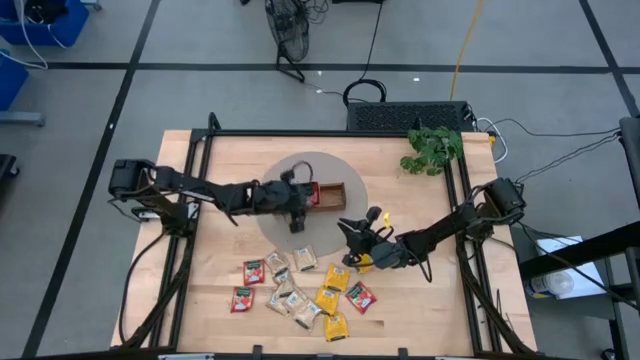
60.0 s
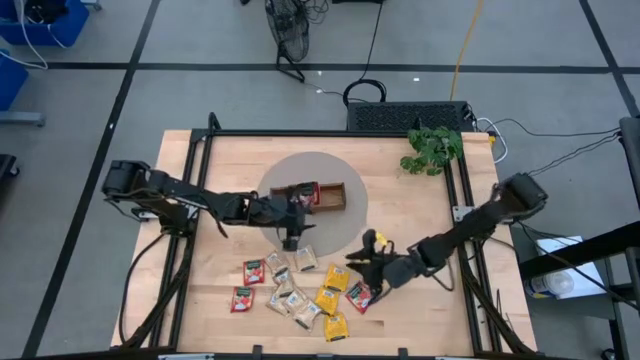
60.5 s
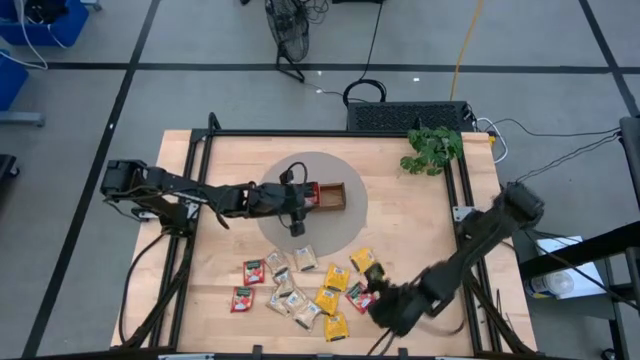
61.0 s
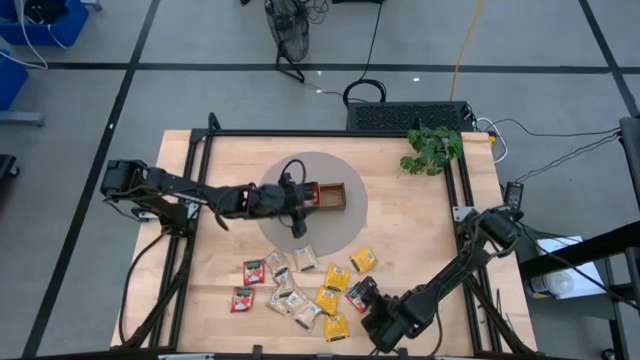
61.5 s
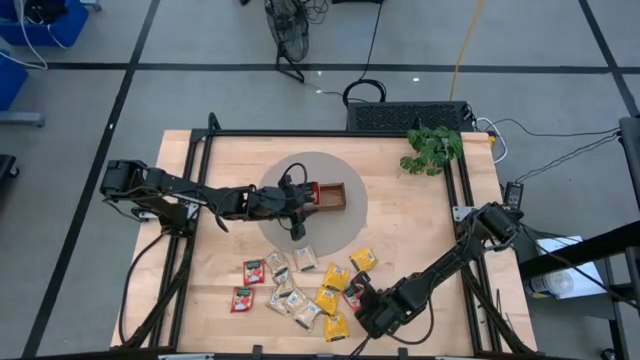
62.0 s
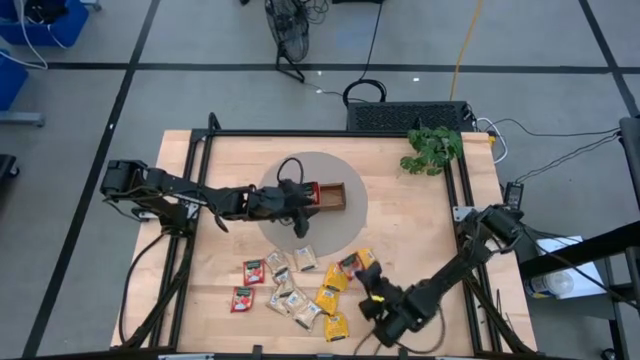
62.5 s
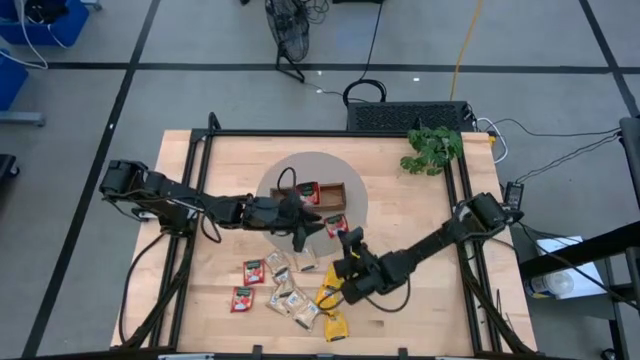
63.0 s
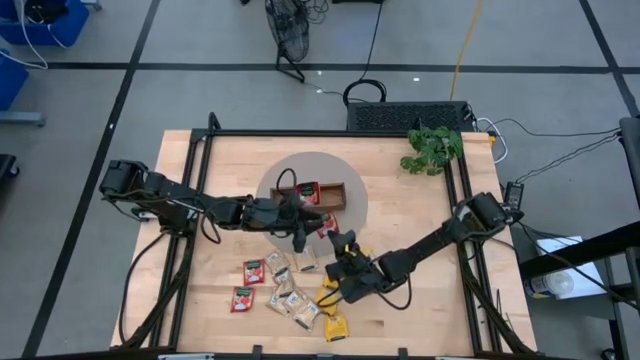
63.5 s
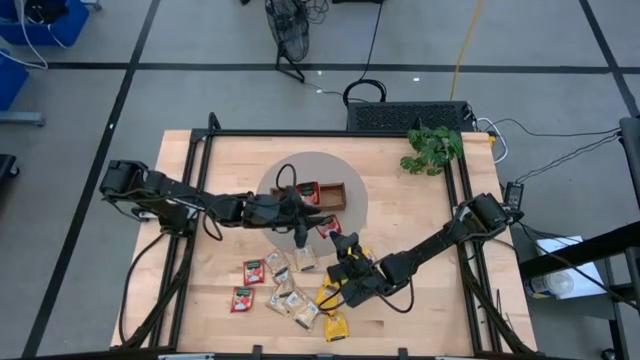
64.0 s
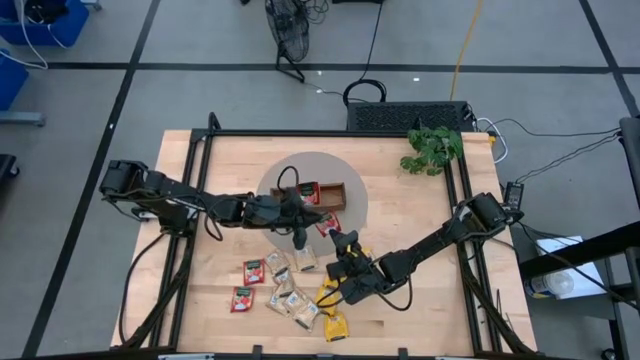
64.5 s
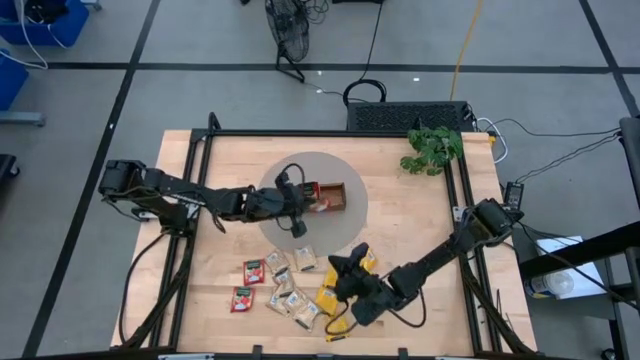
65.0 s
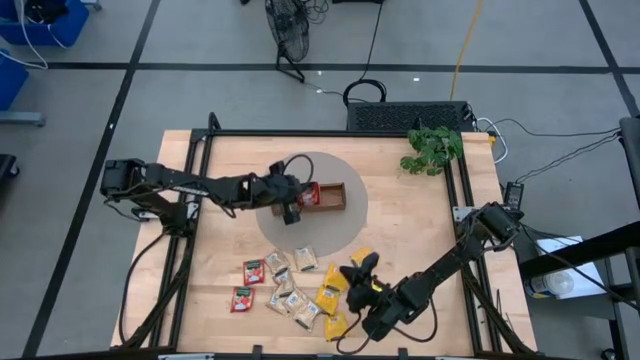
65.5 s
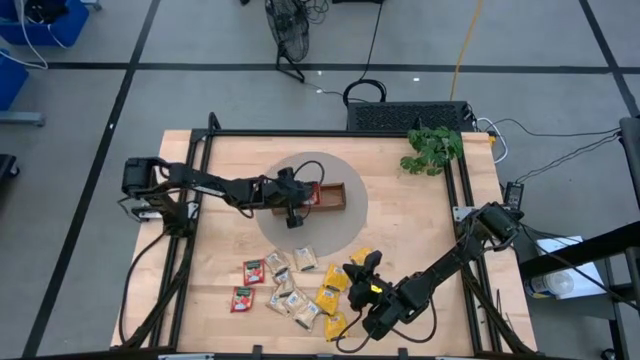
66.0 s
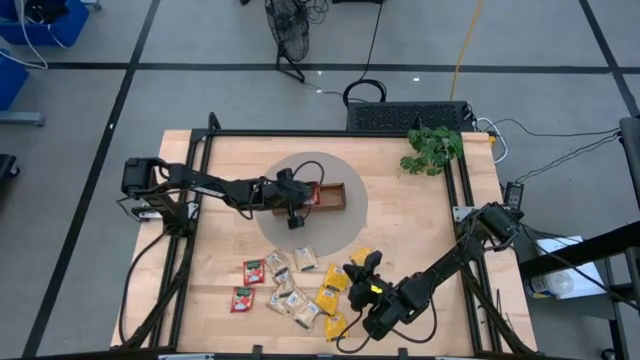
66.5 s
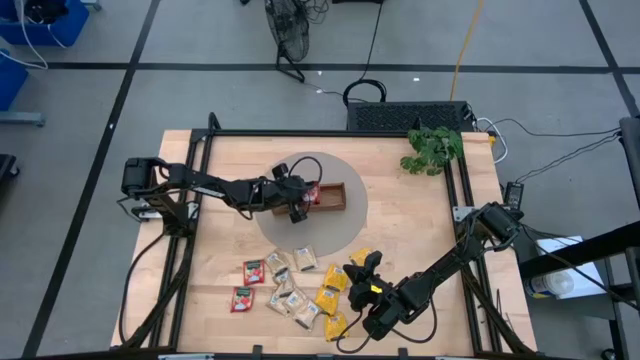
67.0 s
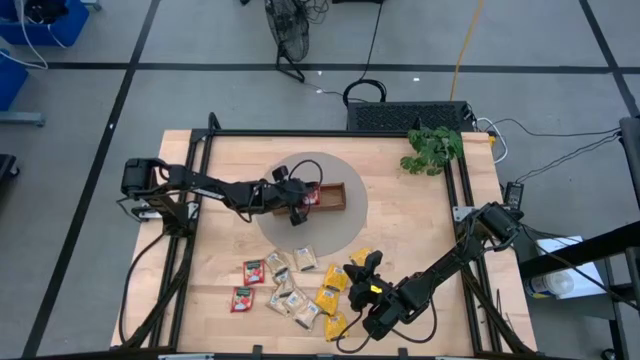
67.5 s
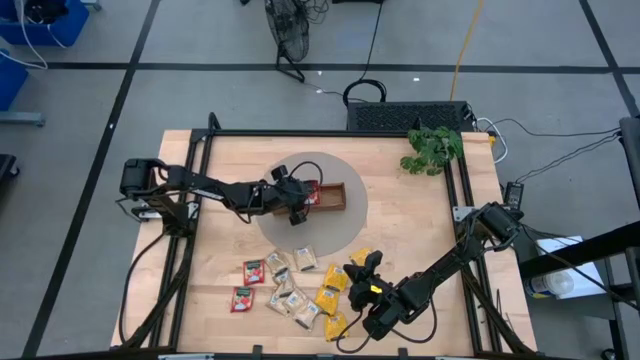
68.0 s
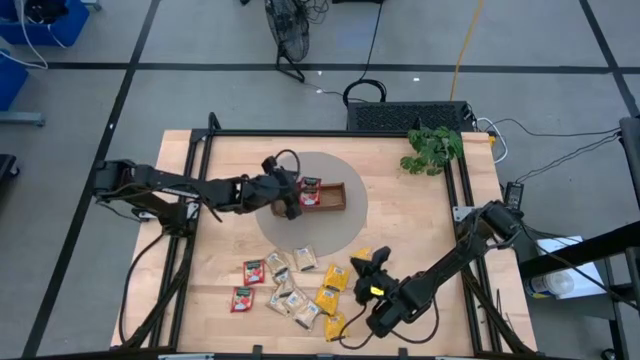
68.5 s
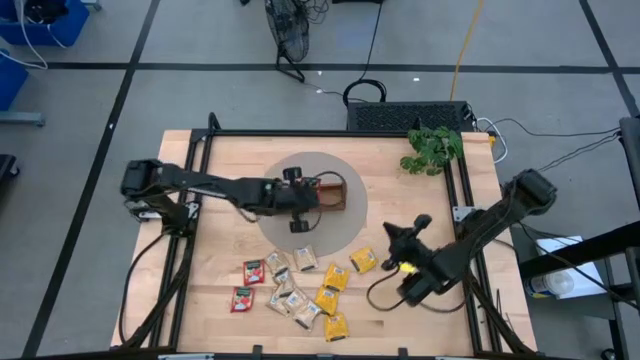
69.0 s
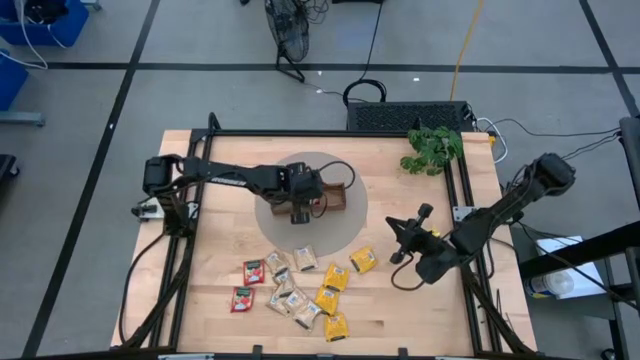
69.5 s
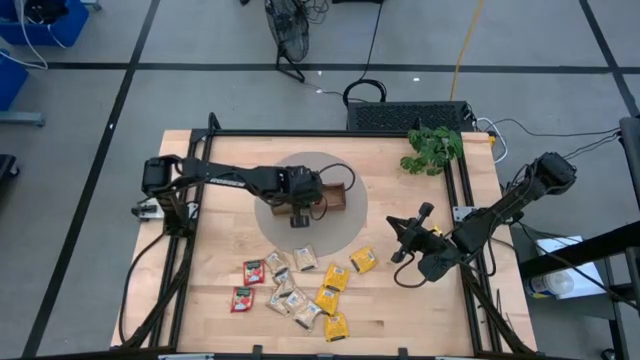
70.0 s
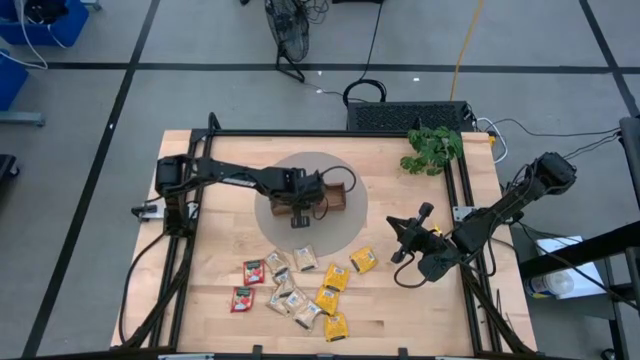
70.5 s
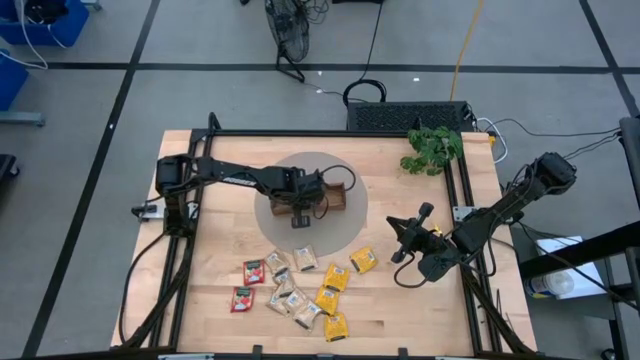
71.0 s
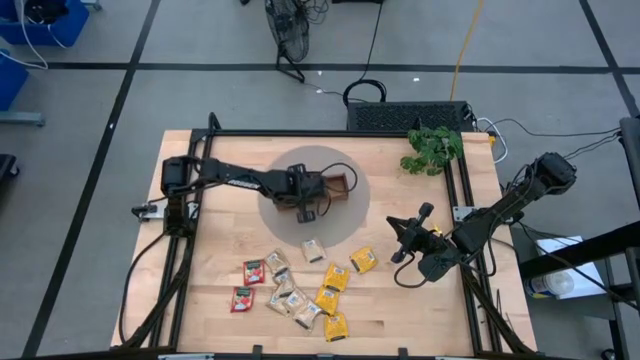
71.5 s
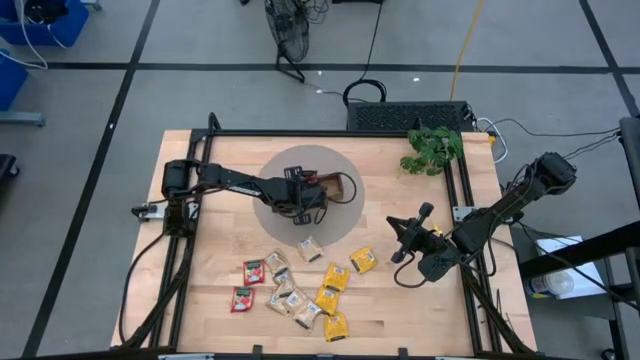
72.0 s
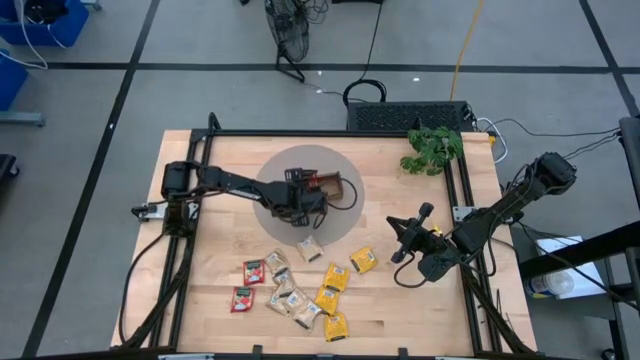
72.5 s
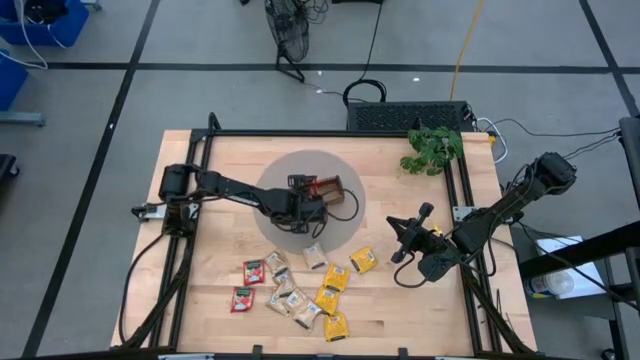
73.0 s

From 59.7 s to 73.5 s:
Task: Pick & Place Tea
Put the red tea bag into the wooden organizer

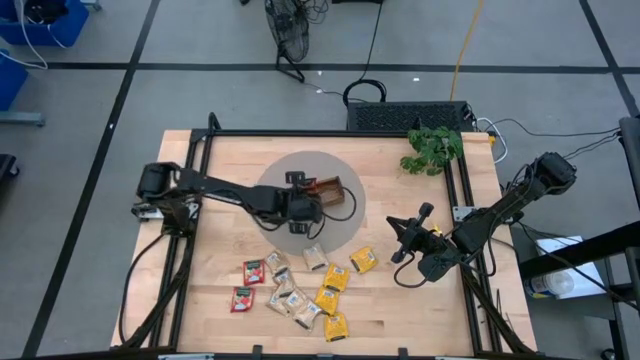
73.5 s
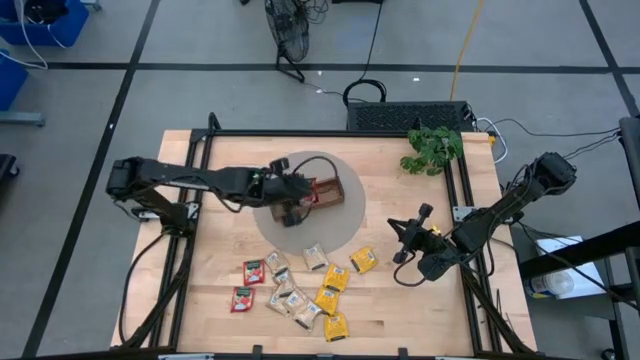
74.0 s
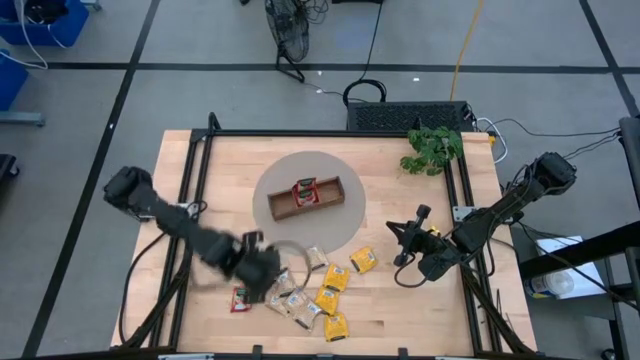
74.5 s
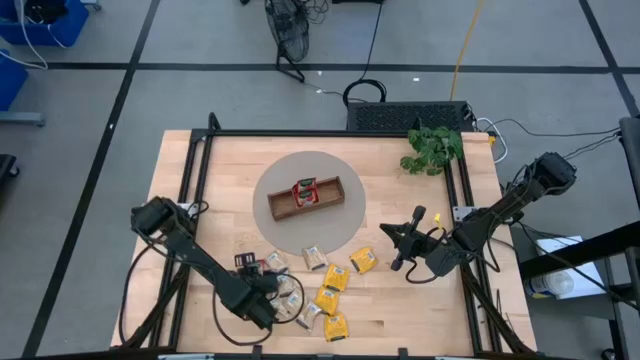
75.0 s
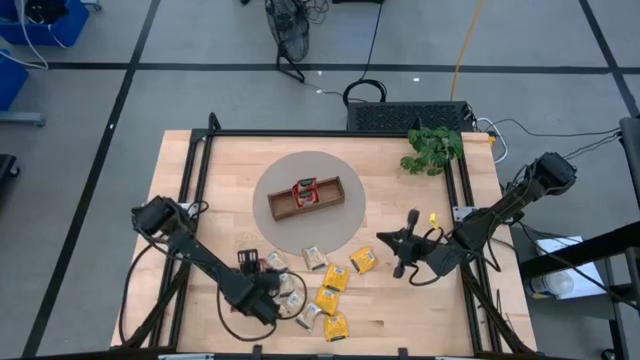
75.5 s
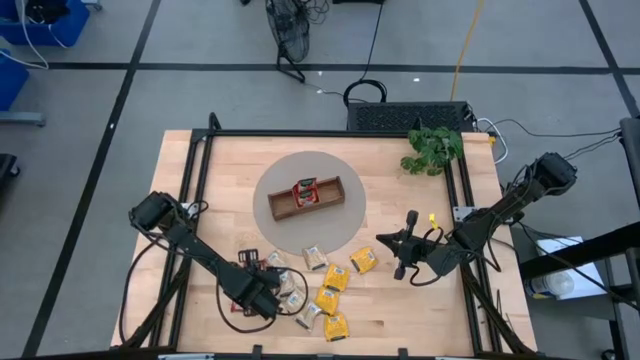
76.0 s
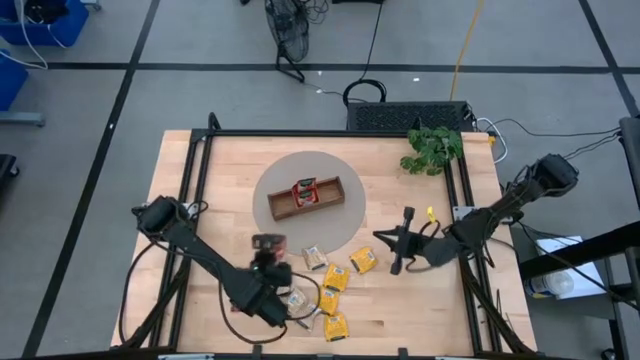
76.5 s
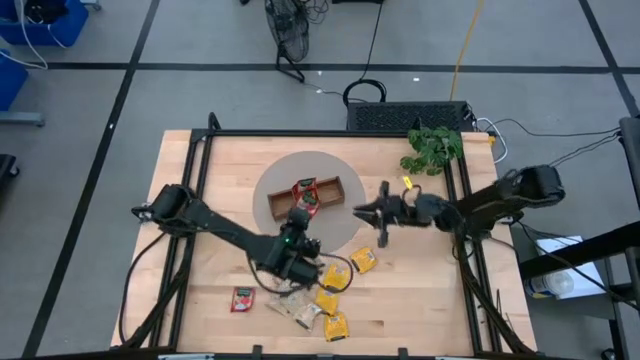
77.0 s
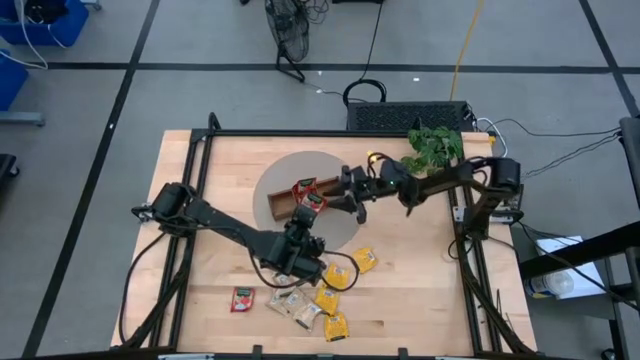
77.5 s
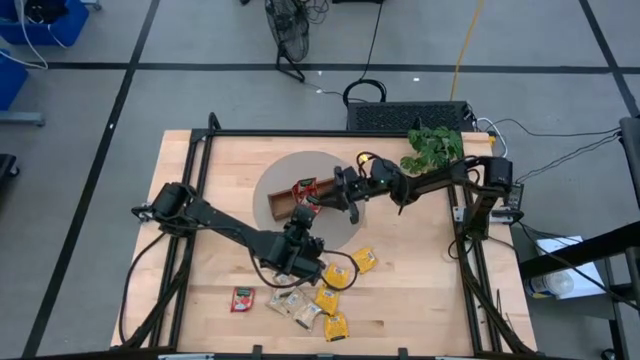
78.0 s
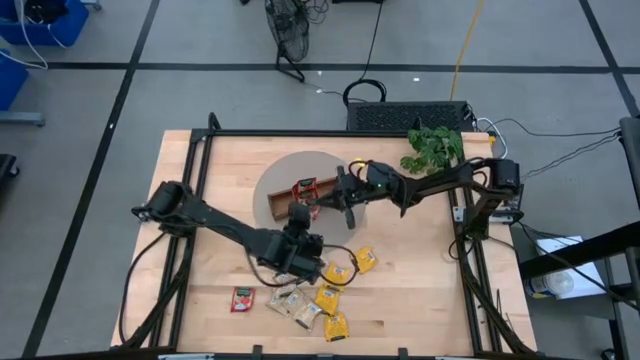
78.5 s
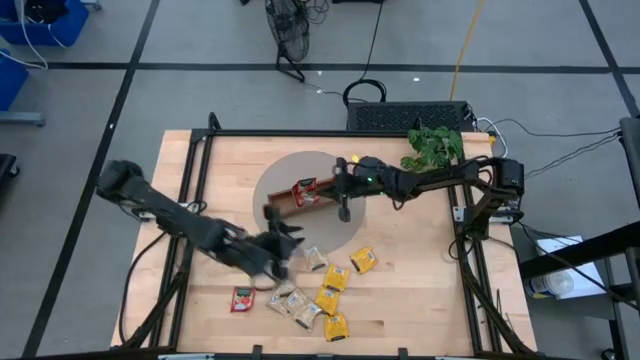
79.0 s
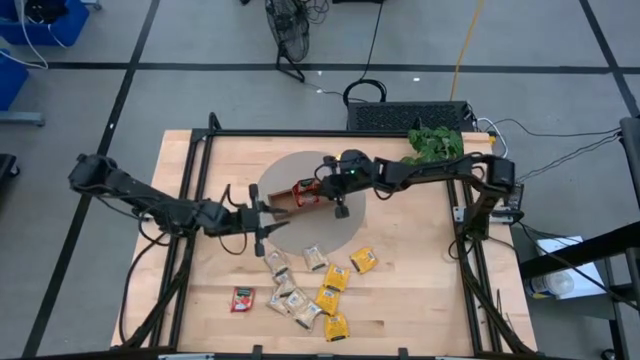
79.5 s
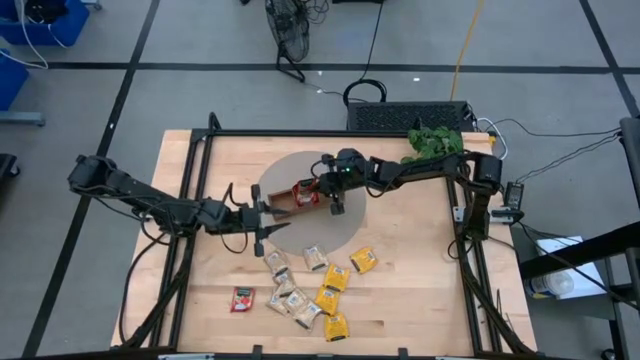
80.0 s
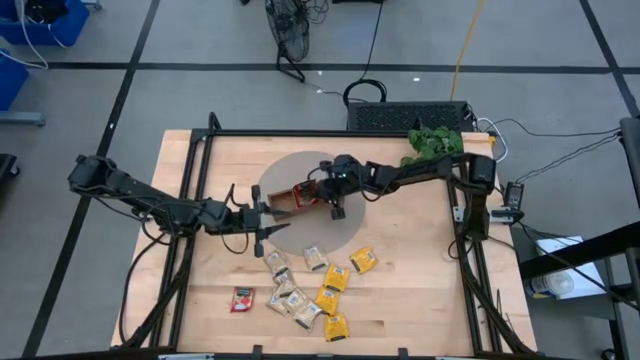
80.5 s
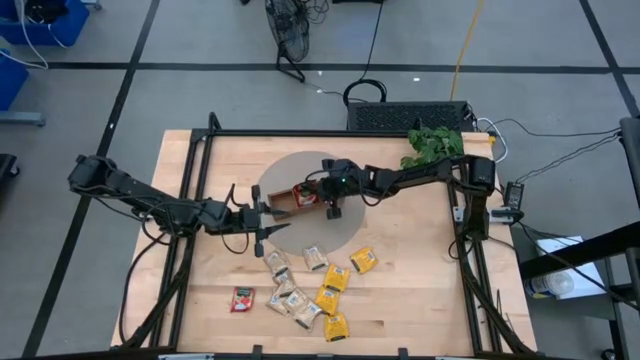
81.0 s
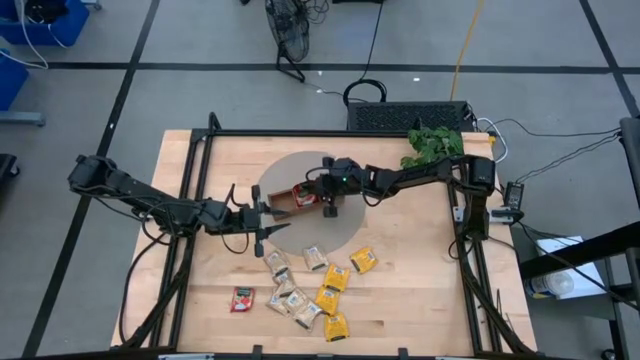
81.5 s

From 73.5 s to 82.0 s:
Put the red tea bag into the wooden organizer
